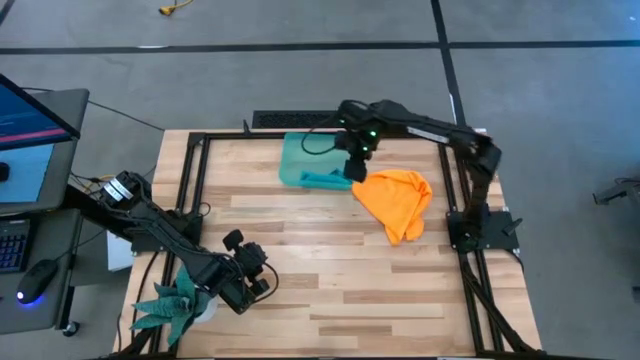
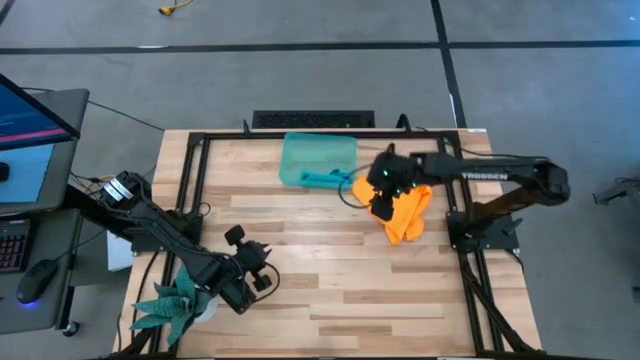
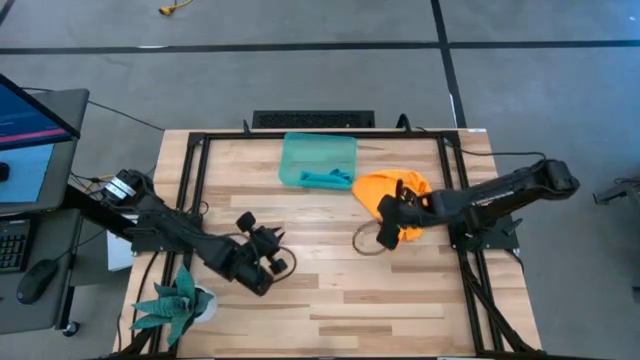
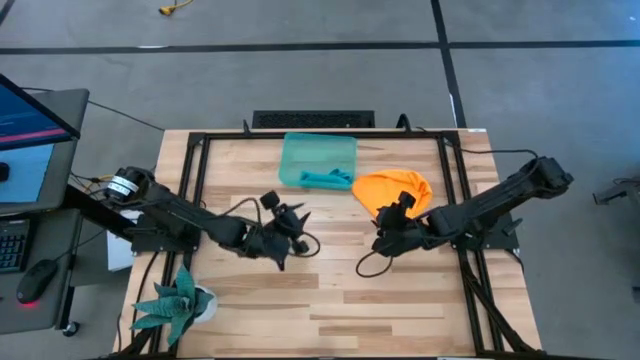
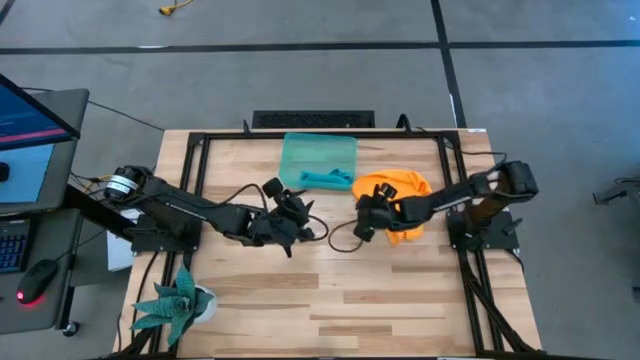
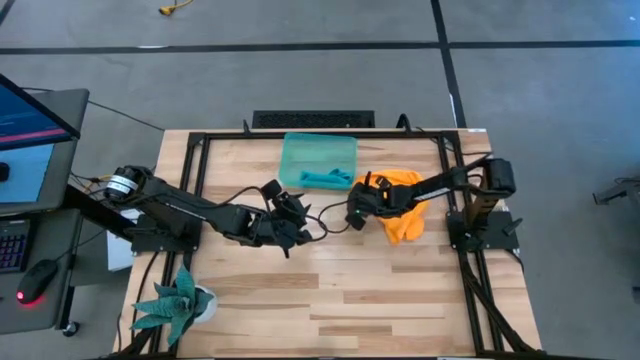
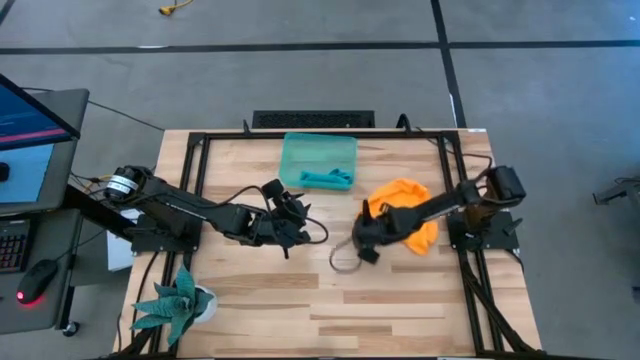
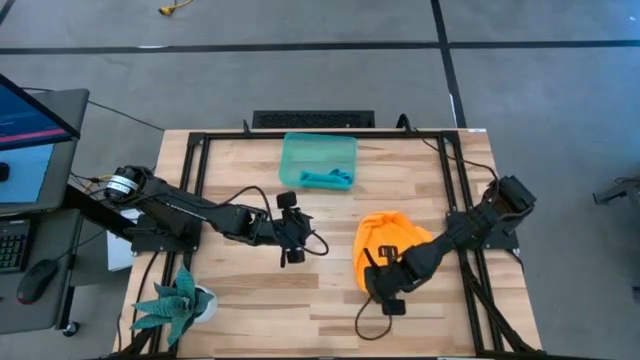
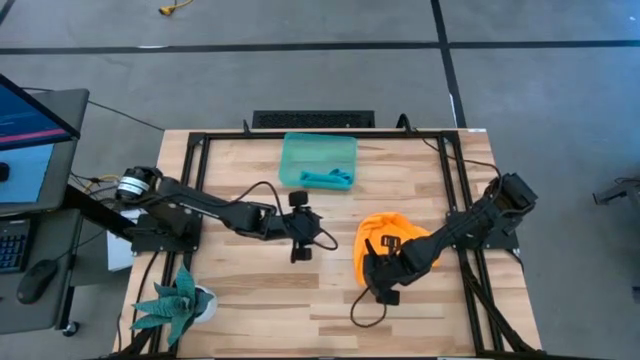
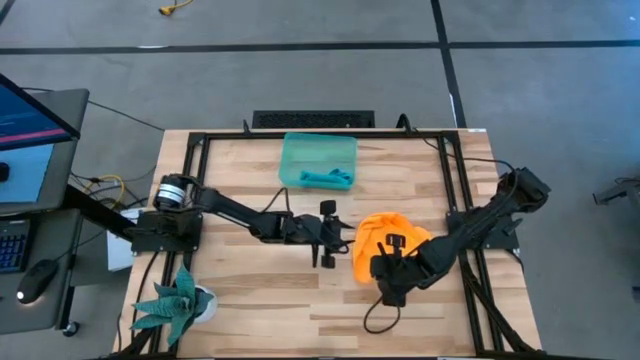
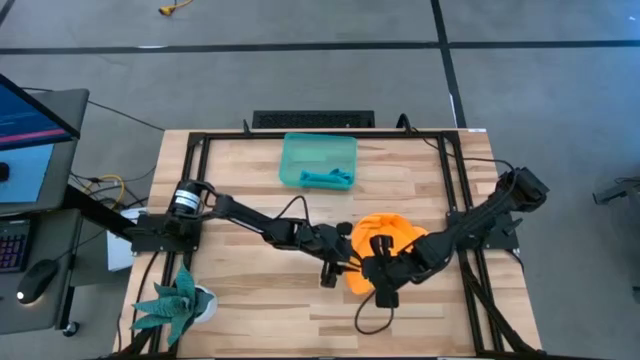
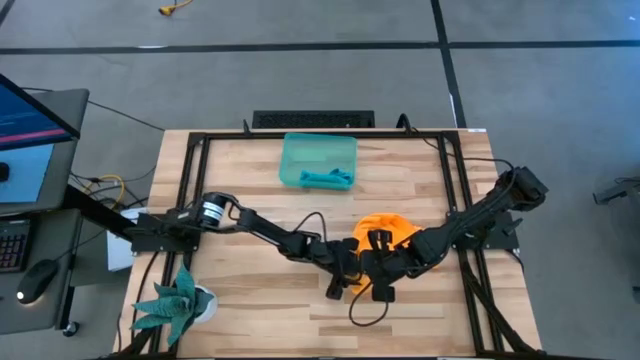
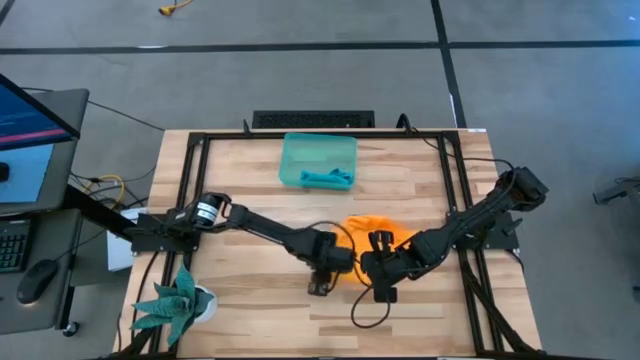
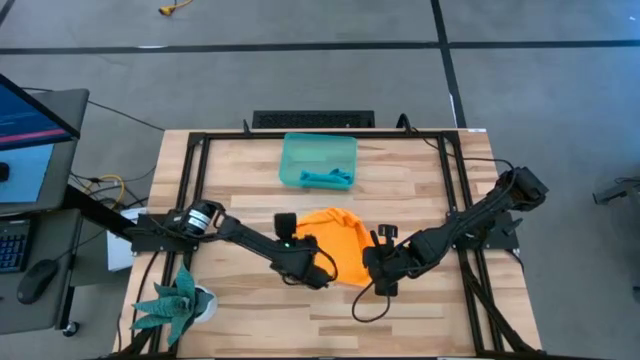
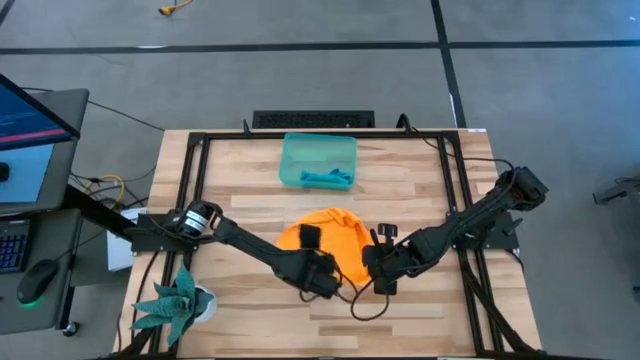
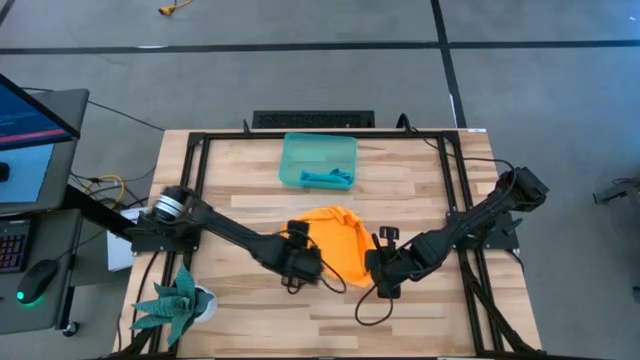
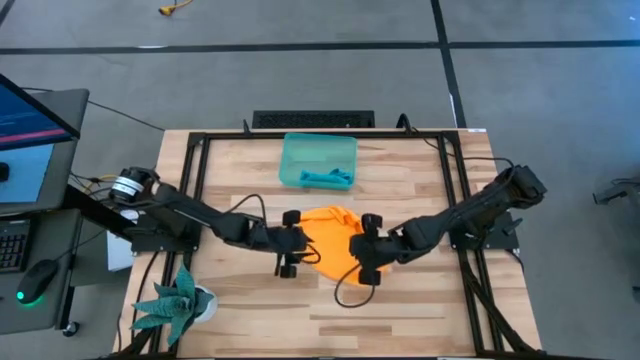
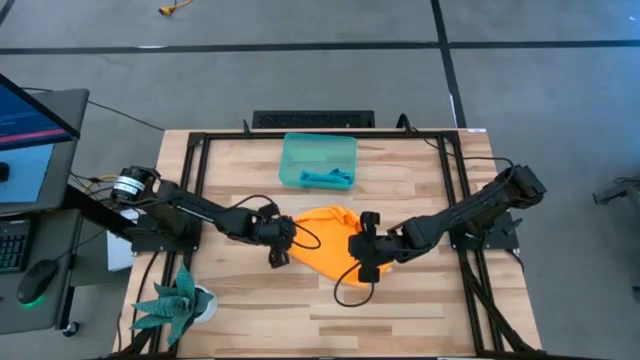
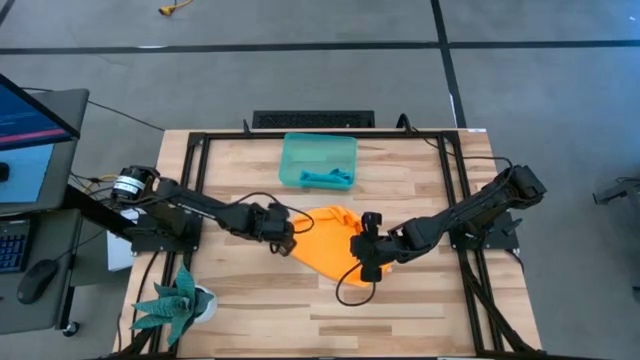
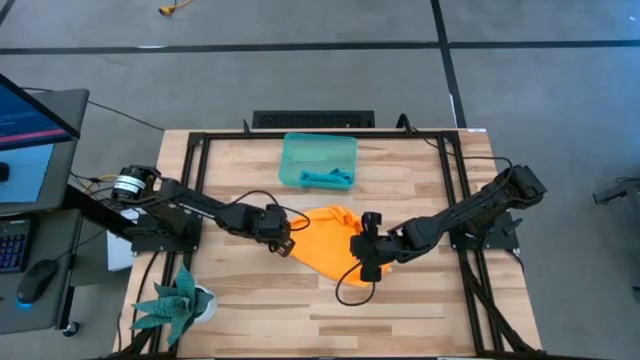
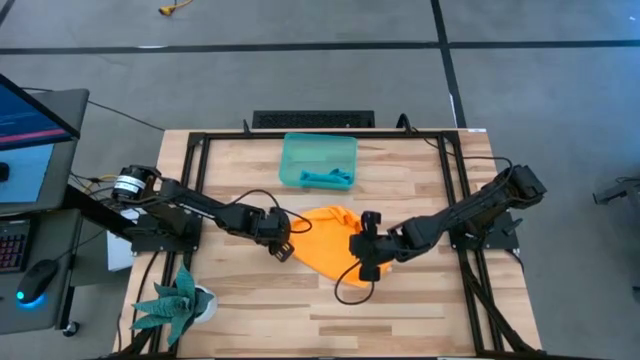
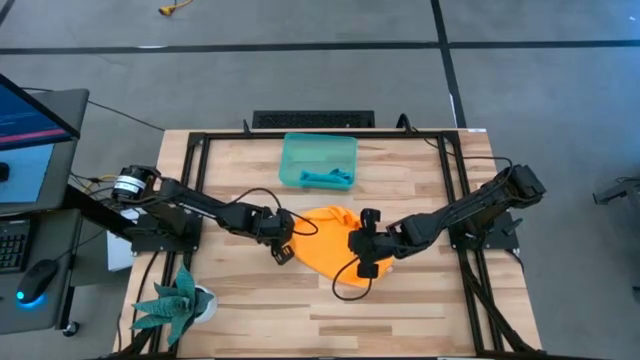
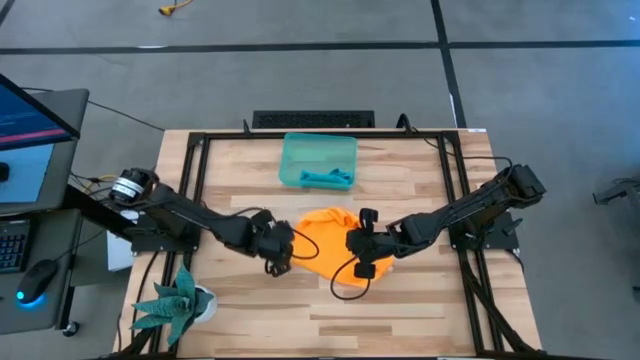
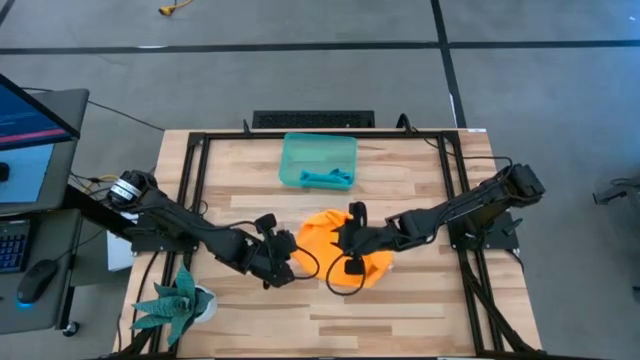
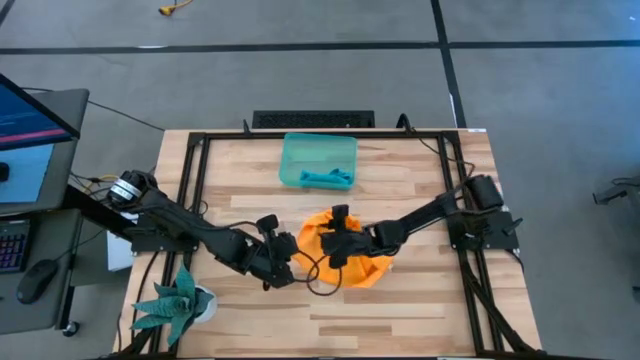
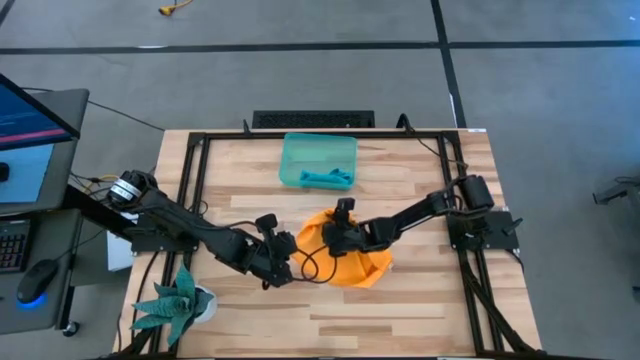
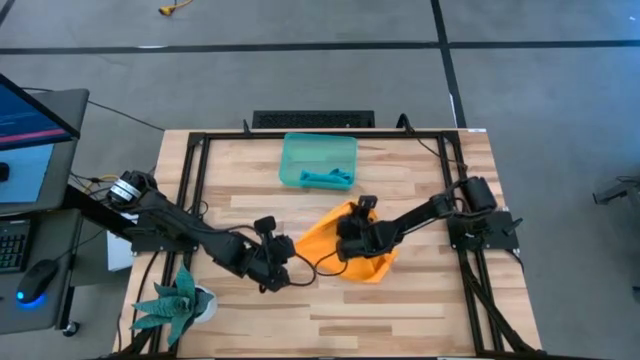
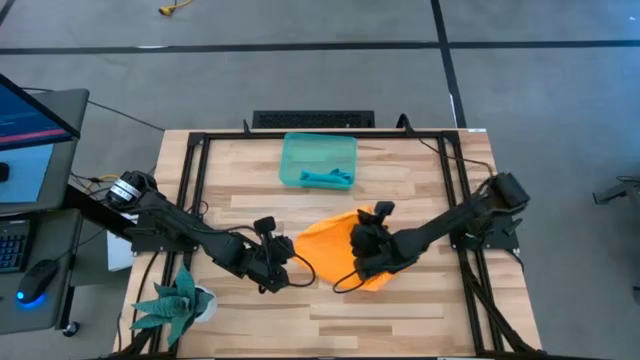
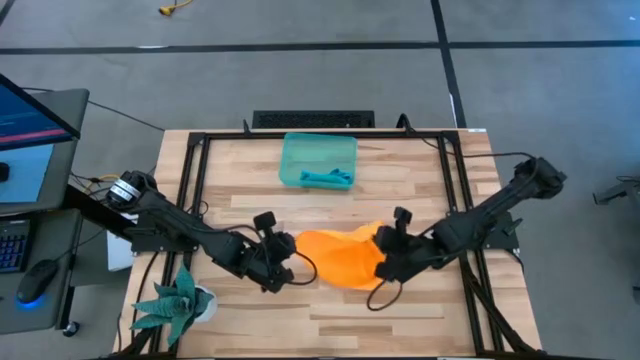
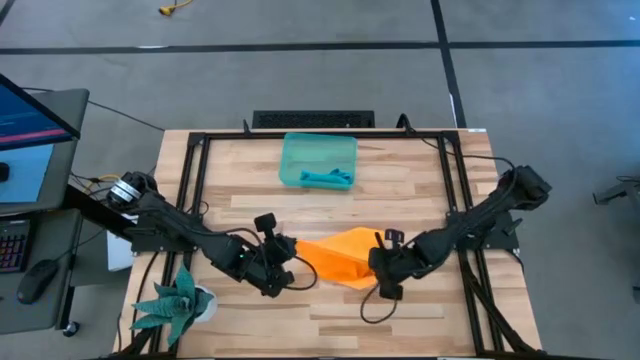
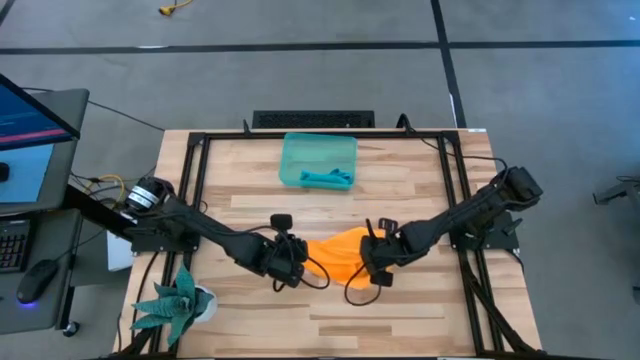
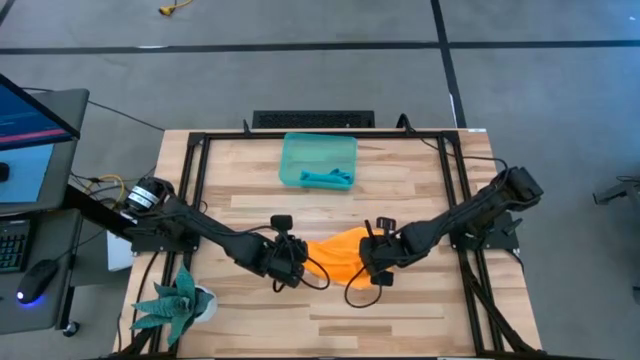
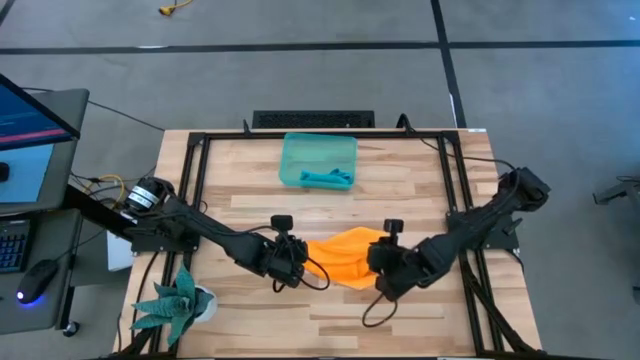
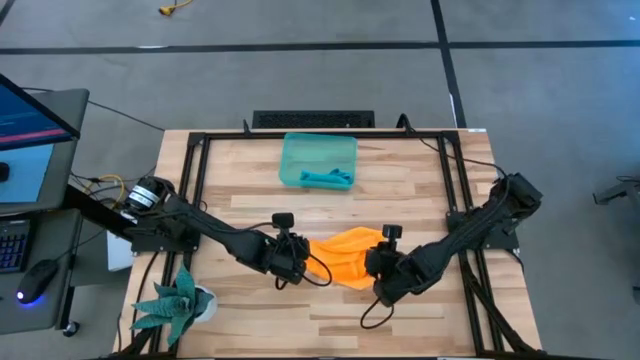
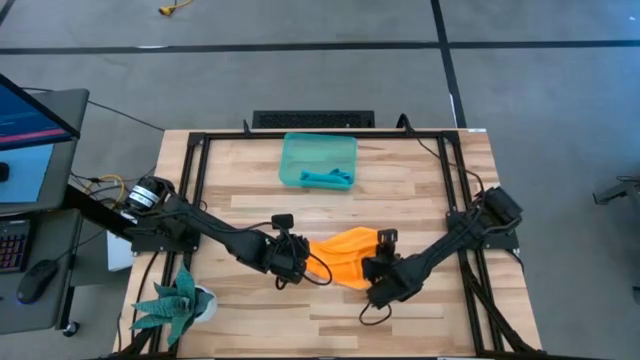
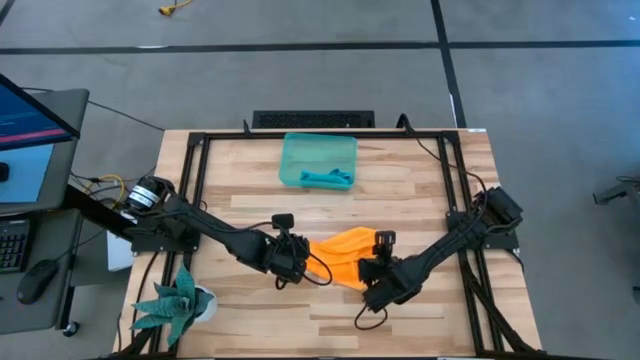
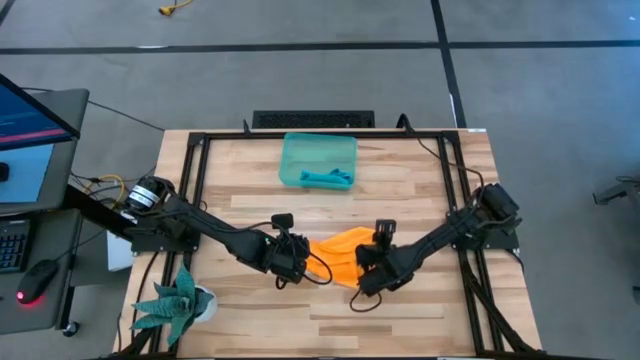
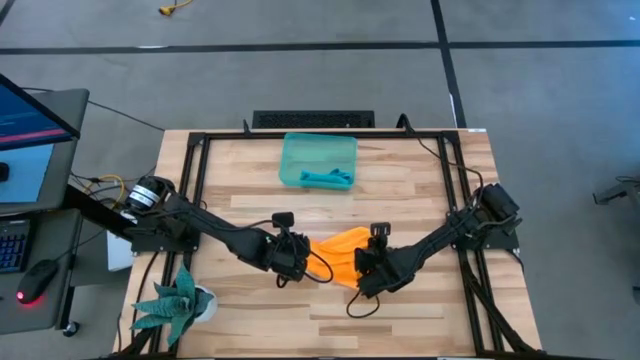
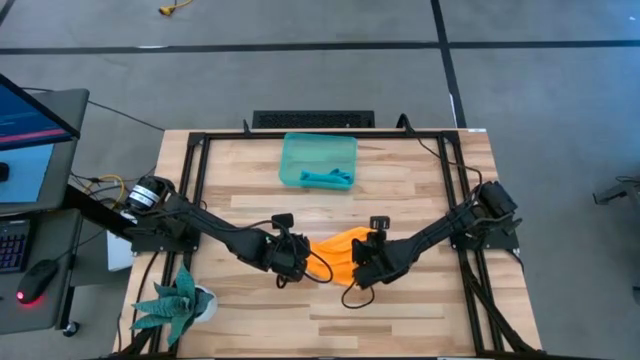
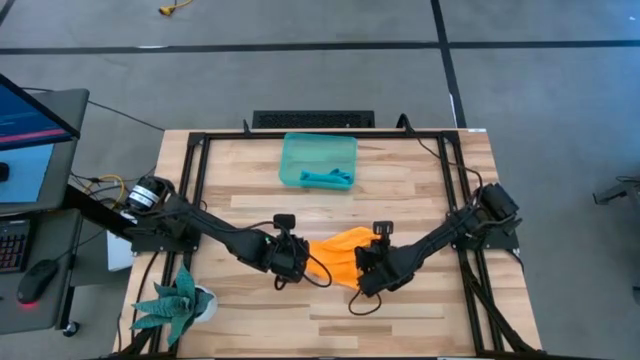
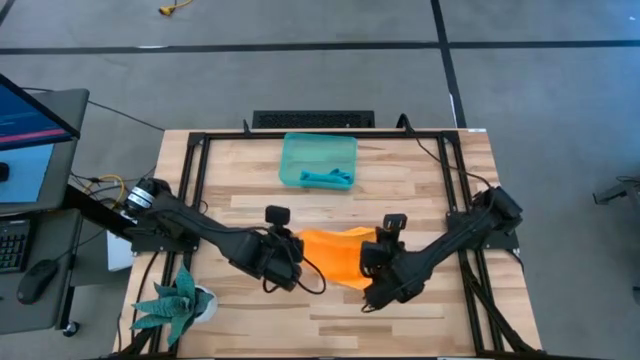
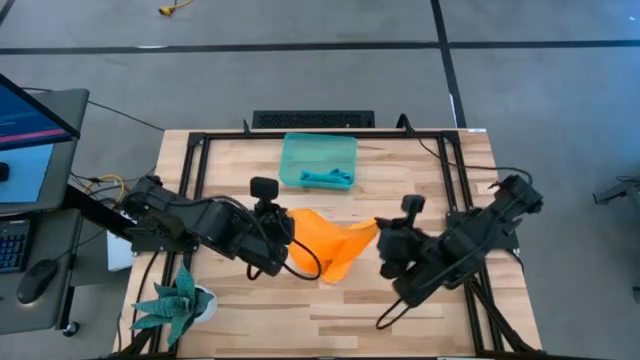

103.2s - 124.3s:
Task: Roll microfiber towels into tight, uniform cylinder then place into a basket
Fold the yellow microfiber cloth

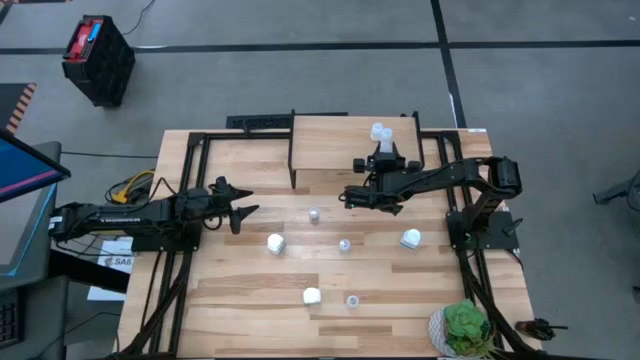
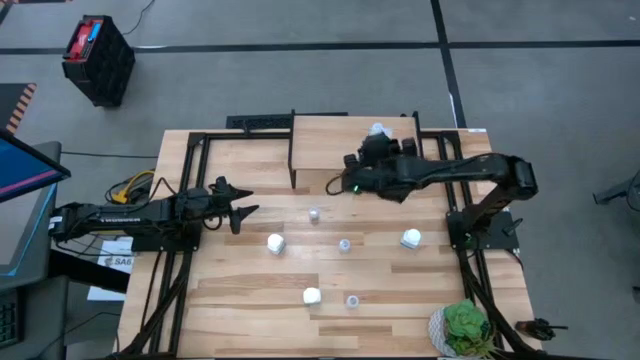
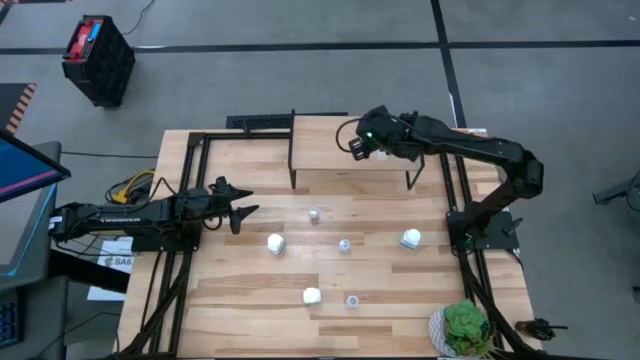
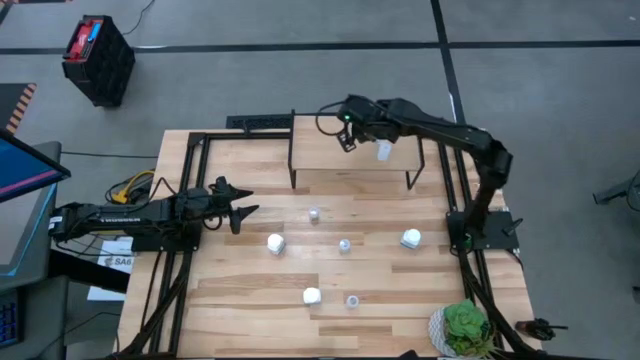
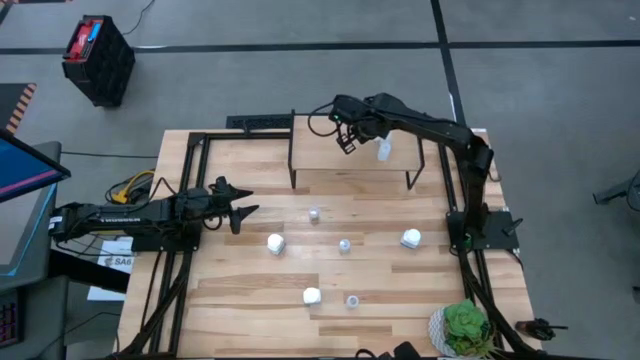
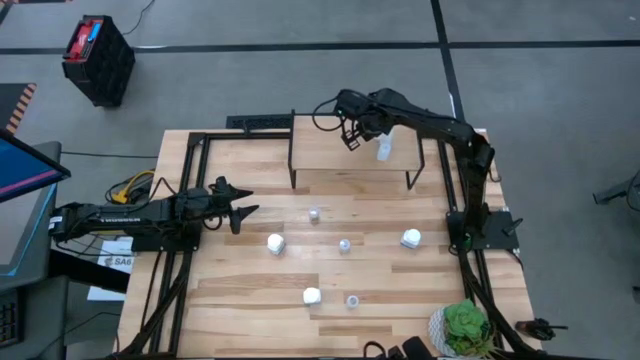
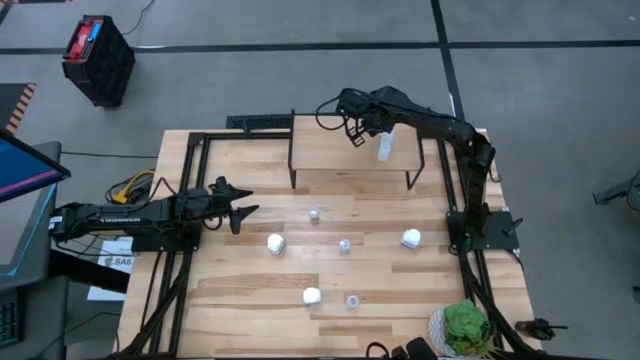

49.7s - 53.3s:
Task: Pick and place medicine bottles onto shelf by color
Adjust the top pill bottle on the shelf
